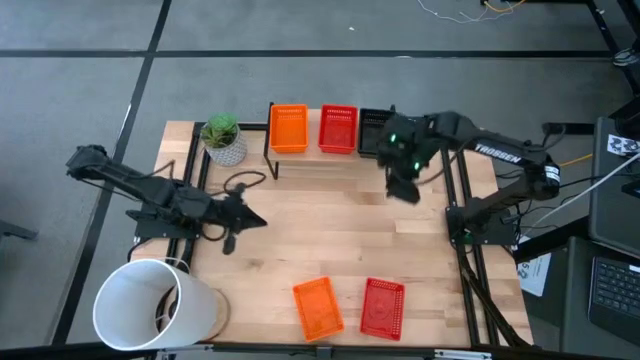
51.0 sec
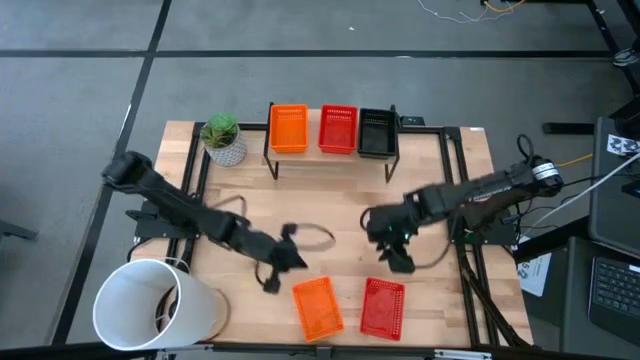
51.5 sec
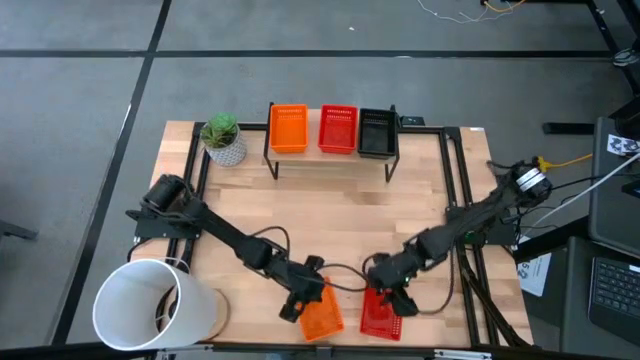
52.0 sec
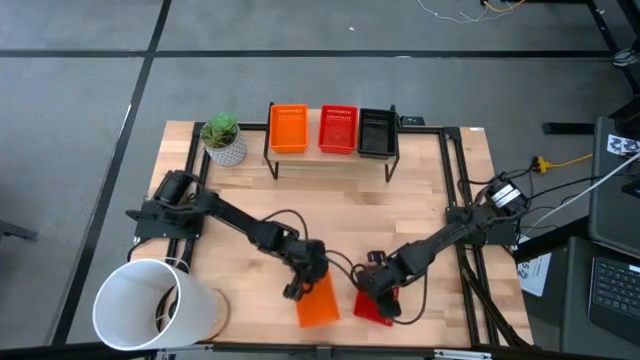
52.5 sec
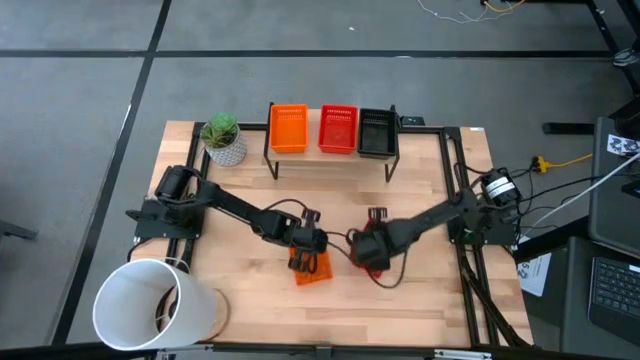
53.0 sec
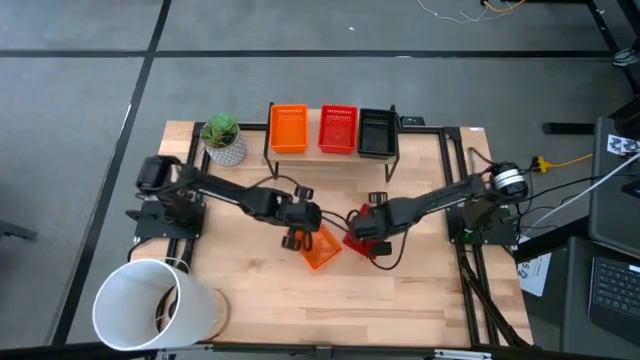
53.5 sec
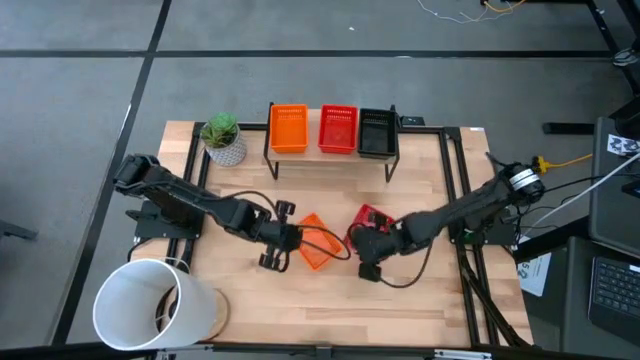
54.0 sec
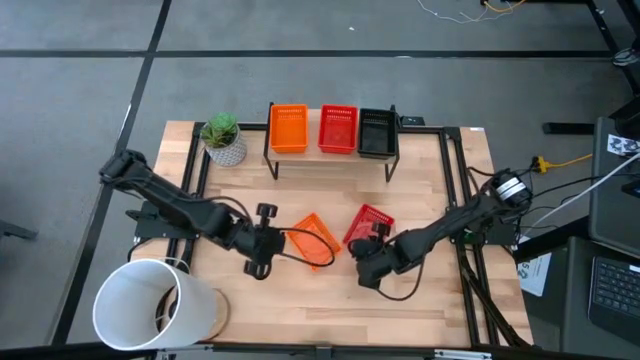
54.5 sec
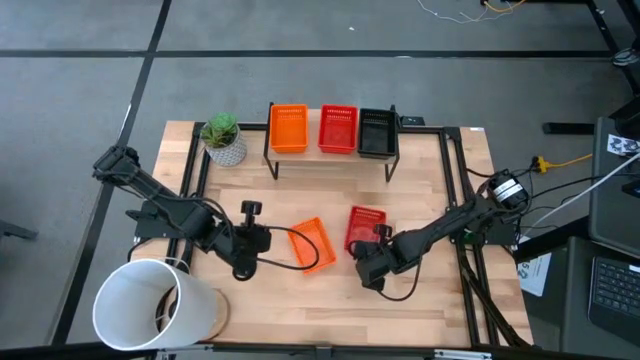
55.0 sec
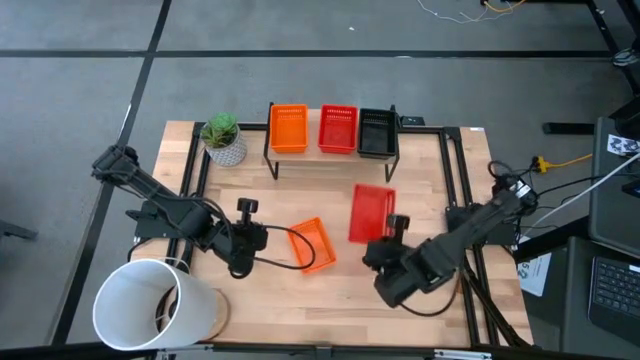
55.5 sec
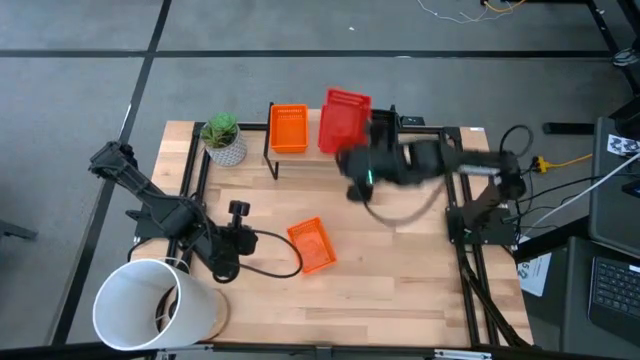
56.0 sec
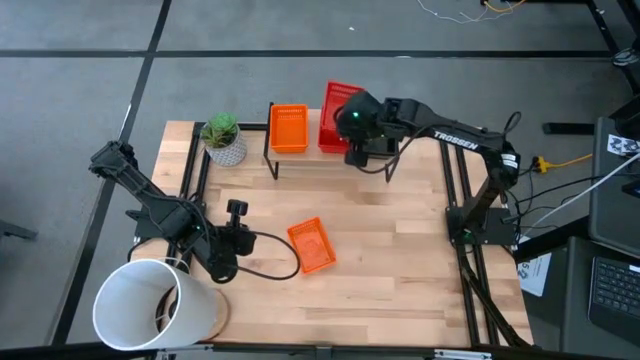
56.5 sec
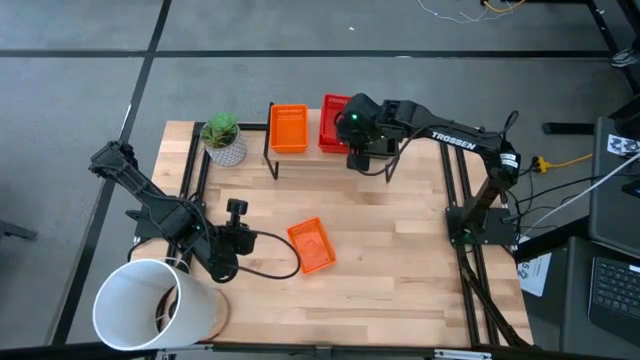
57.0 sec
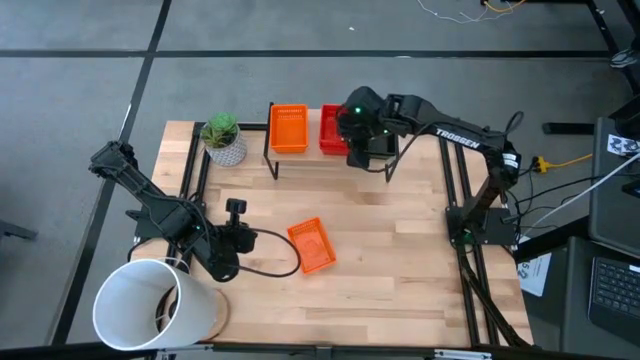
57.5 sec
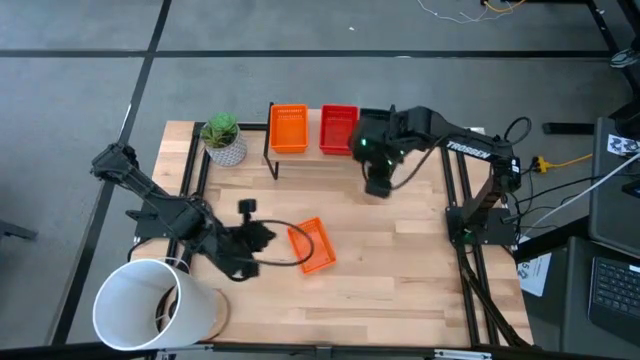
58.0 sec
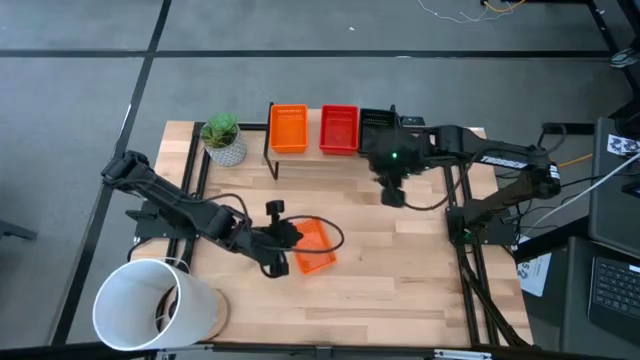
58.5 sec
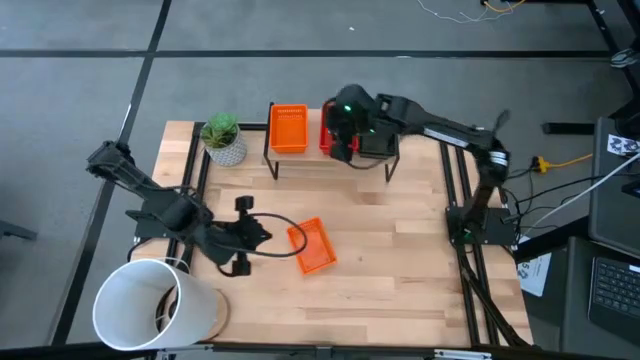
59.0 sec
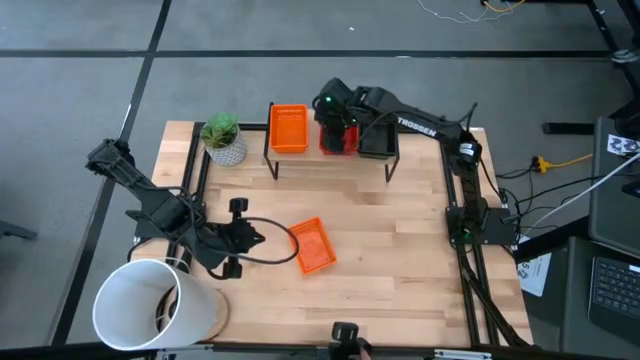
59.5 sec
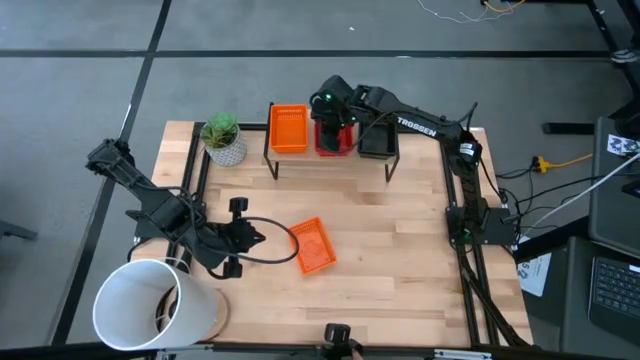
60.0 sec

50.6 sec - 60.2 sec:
Task: Stack baskets on shelf by color
Stack the red bin on top of the red bins on the shelf

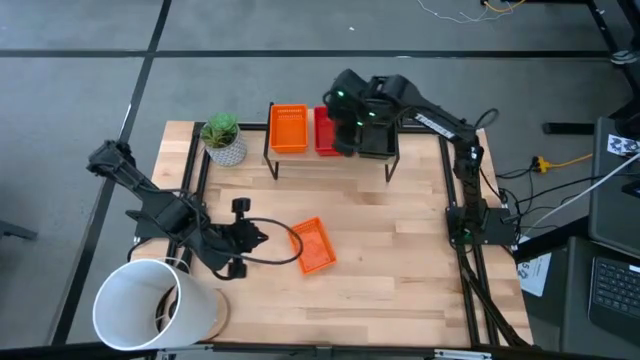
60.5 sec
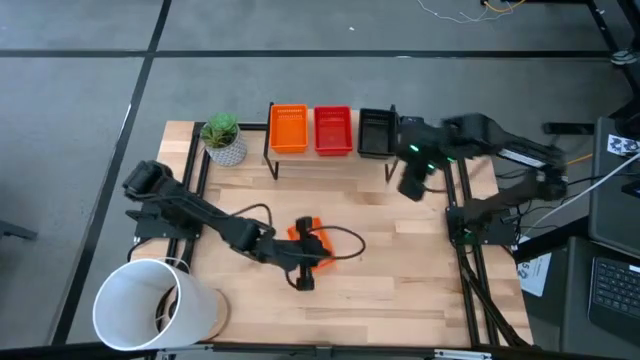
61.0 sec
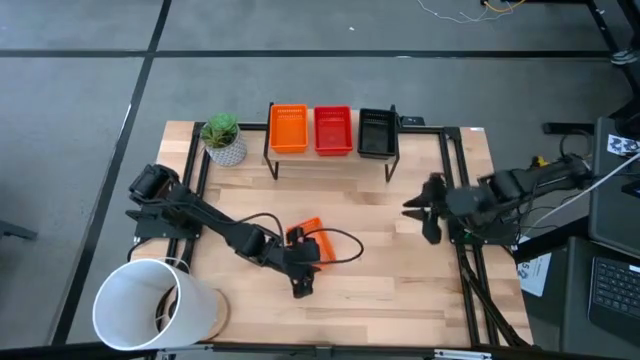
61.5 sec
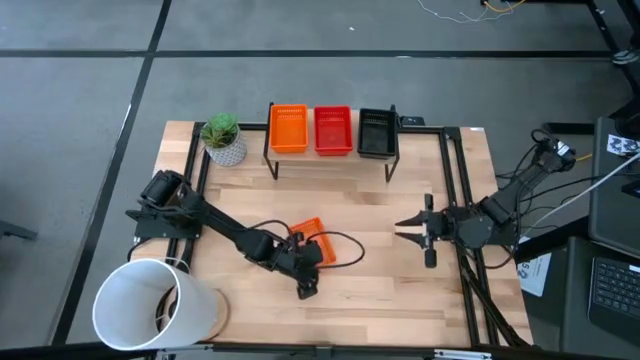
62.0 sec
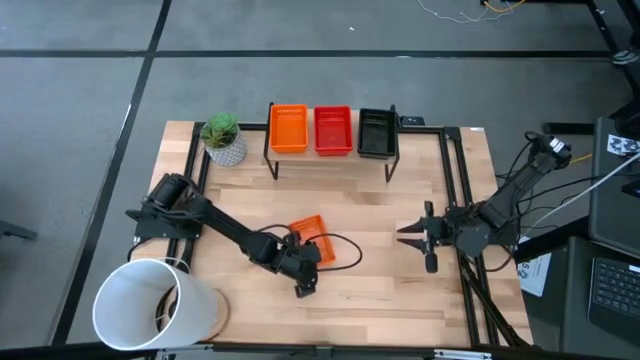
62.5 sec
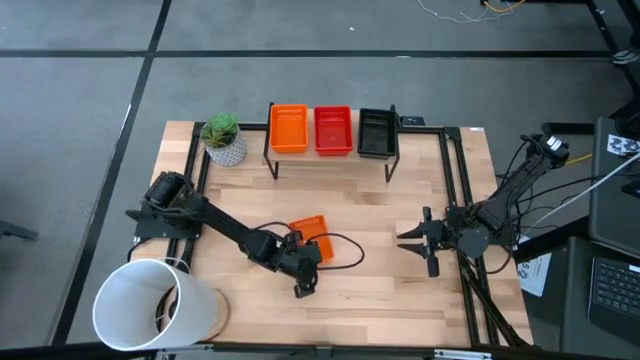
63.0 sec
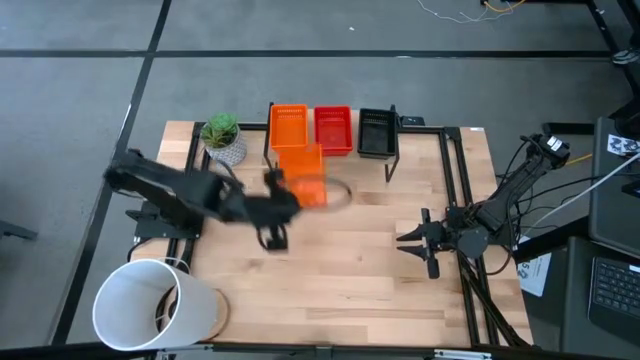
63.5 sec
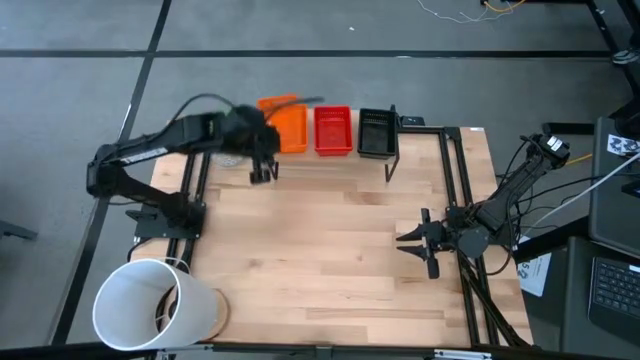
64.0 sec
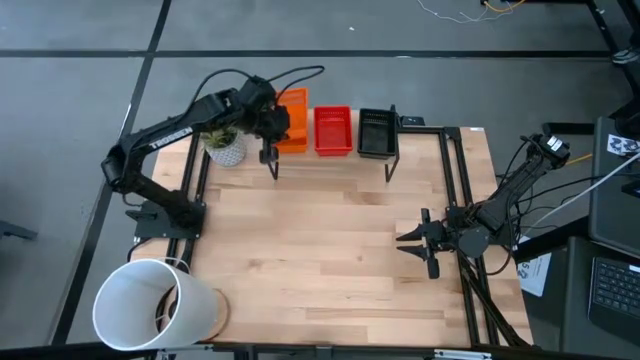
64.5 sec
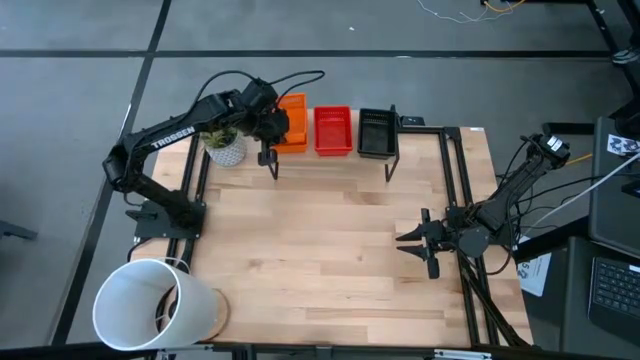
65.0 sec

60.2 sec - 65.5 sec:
Stack the orange bin on top of the orange bins on the shelf

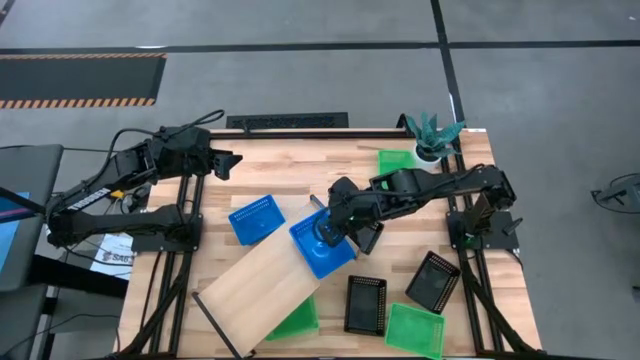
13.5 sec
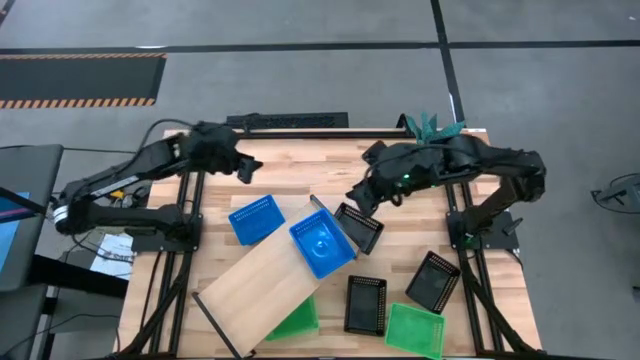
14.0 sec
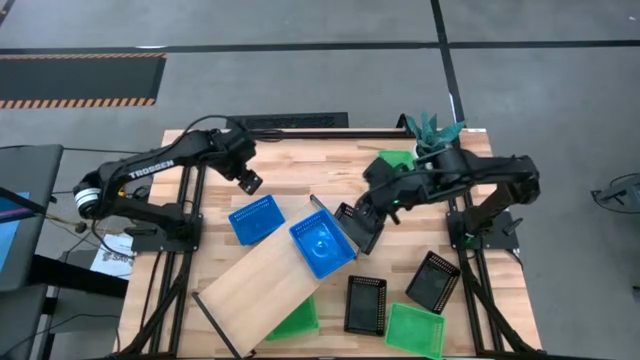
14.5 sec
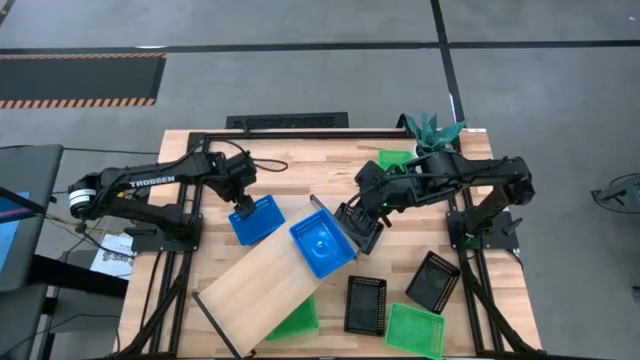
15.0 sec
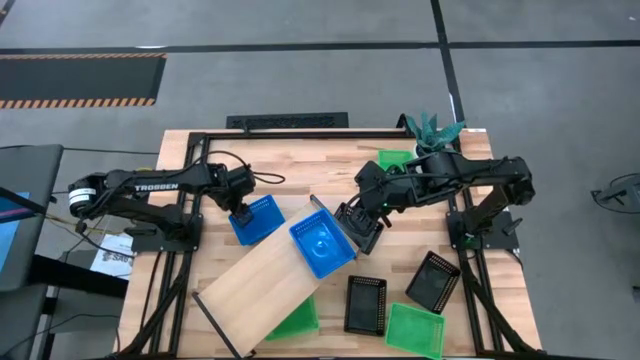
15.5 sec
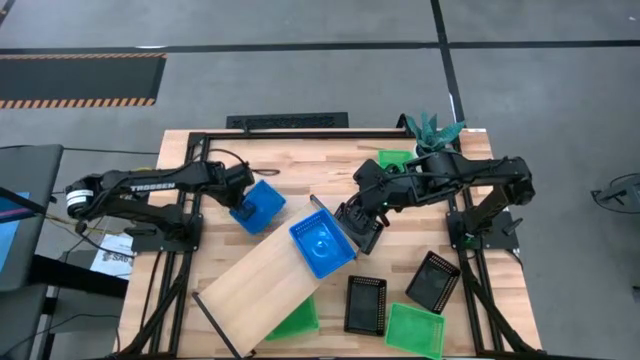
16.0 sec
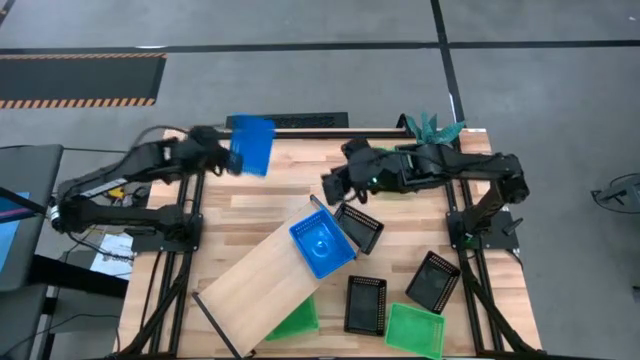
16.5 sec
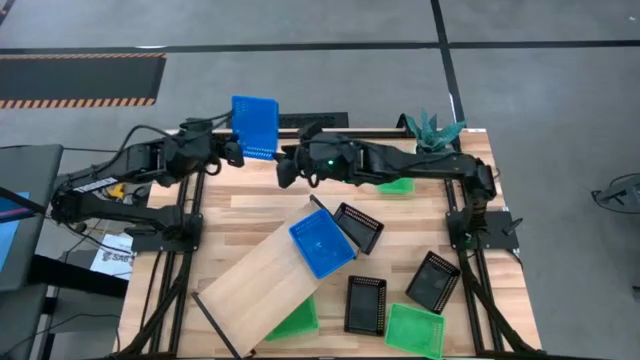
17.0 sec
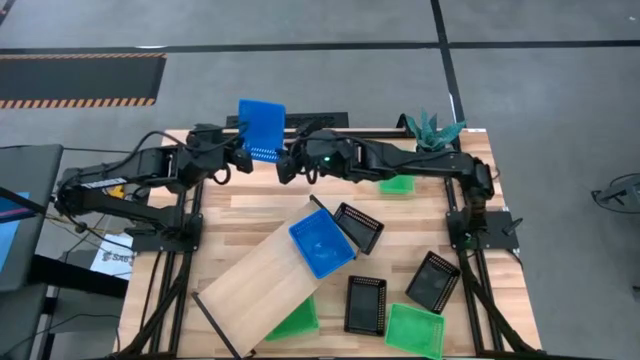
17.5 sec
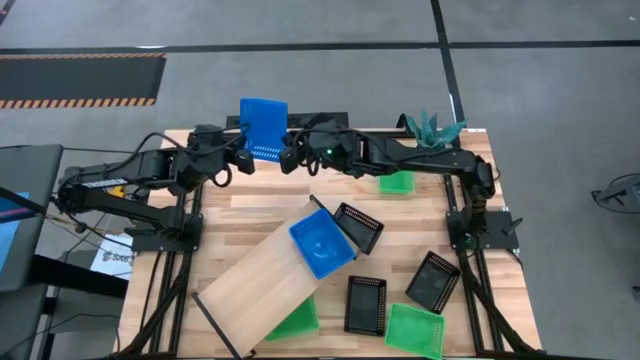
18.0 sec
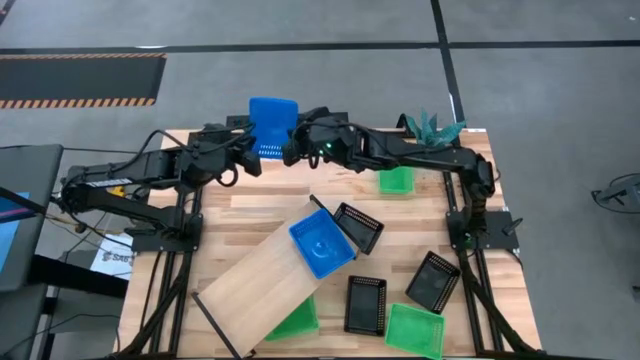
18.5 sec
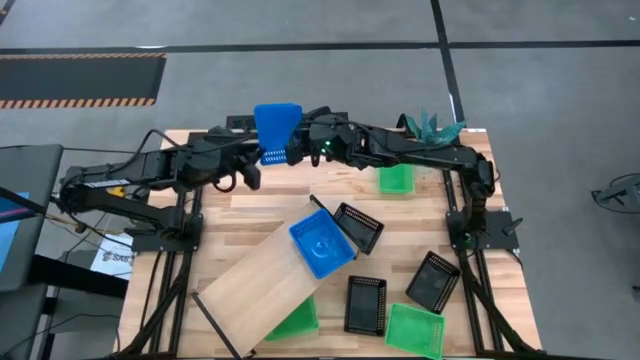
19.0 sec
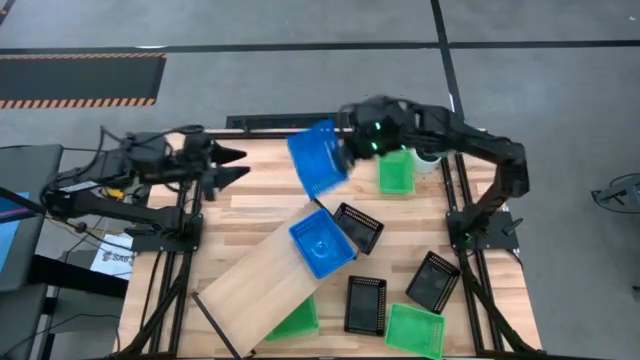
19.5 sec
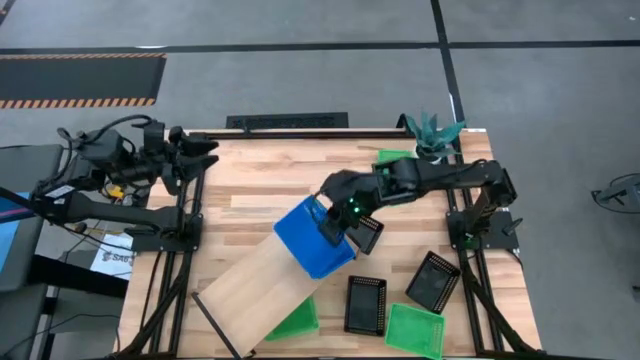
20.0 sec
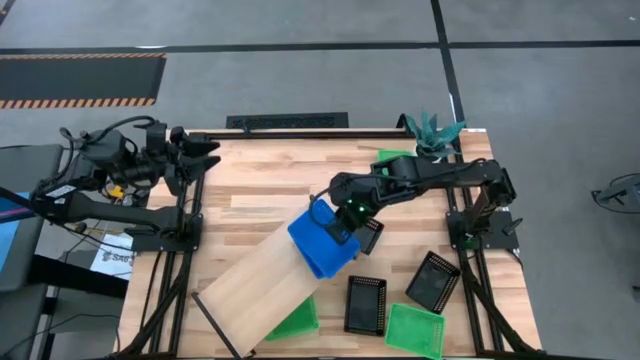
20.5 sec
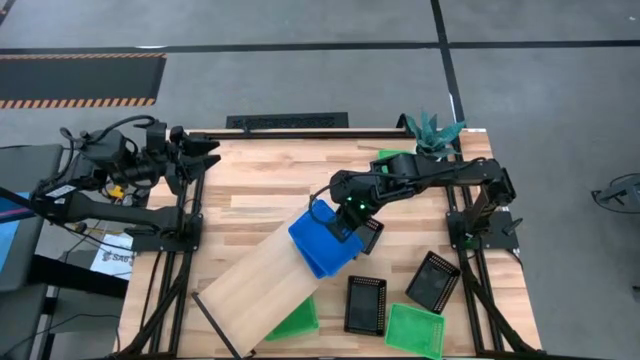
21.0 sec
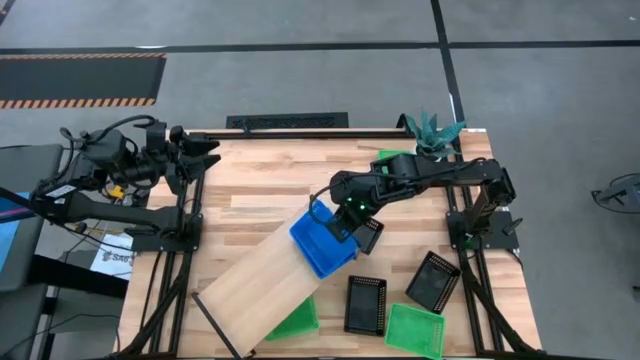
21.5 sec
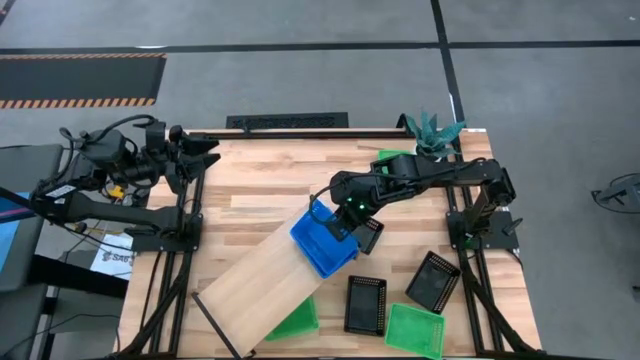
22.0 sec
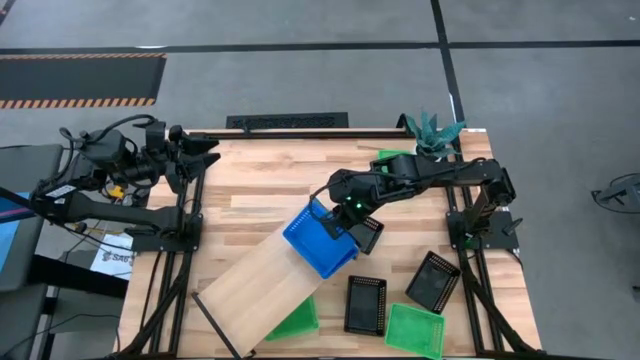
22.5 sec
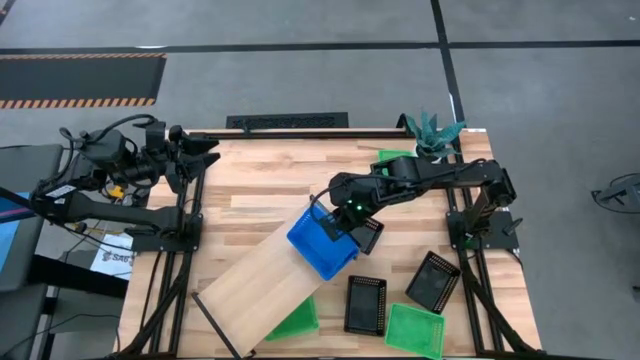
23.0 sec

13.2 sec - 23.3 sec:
Task: Stack baskets on shelf by color
Stack the blue bin on the blue bin on the shelf
